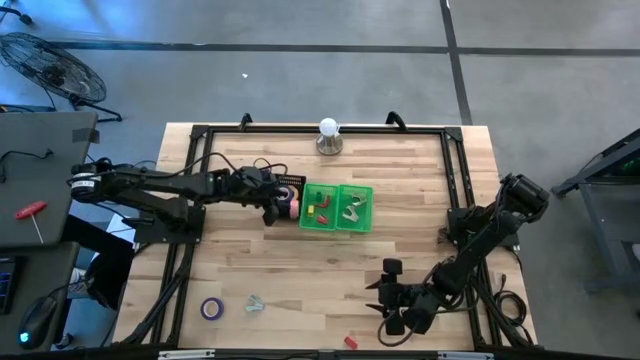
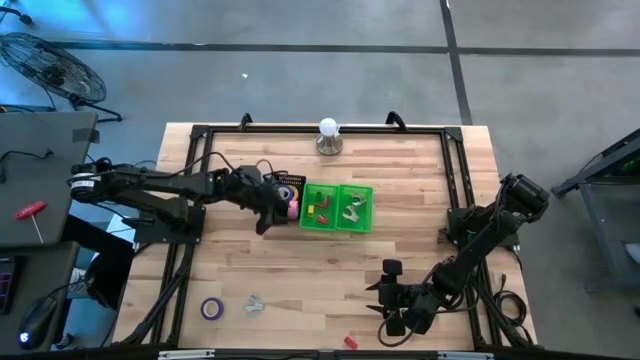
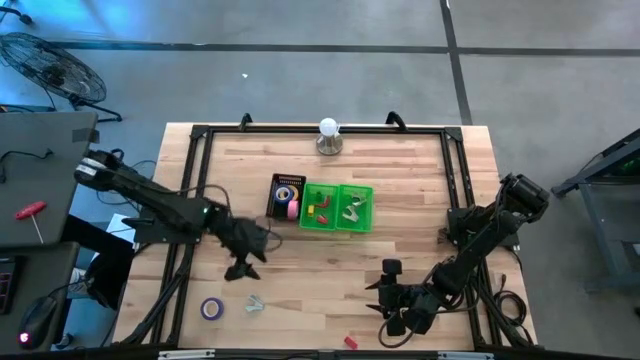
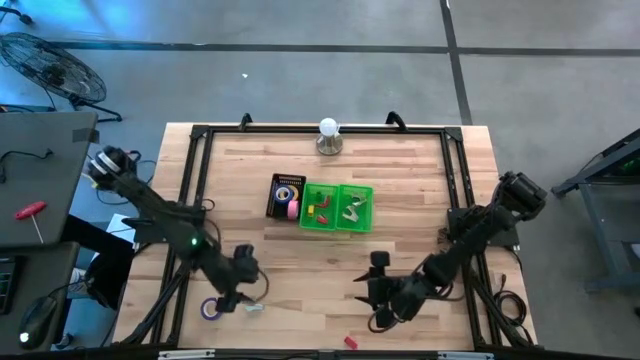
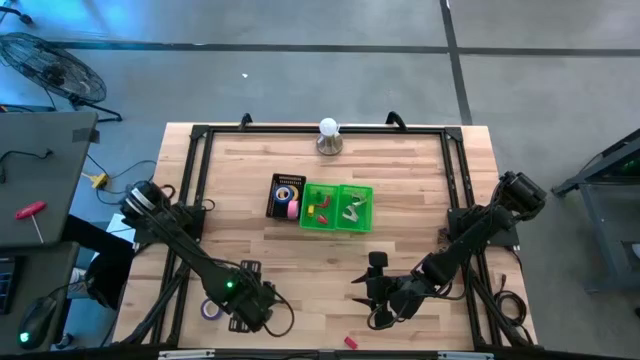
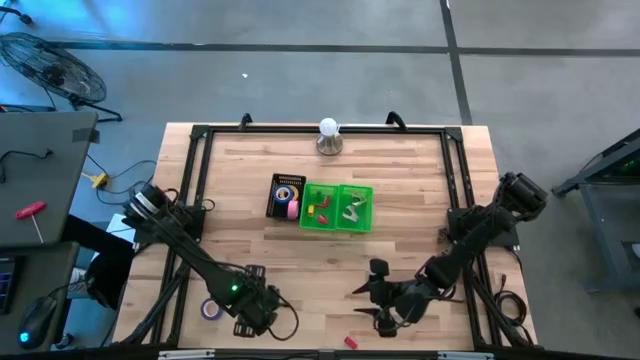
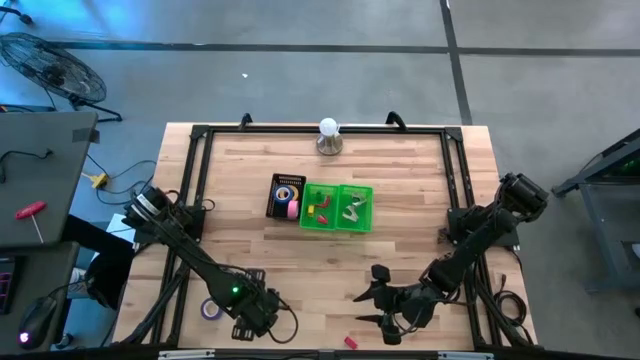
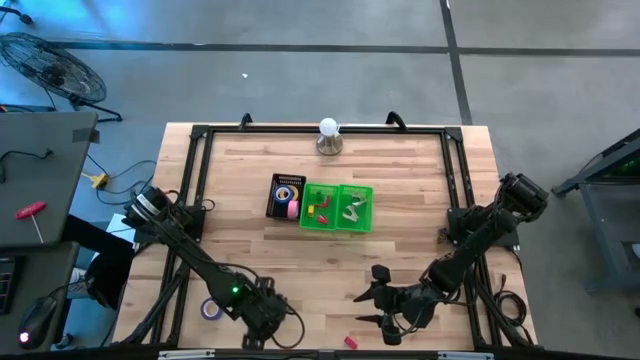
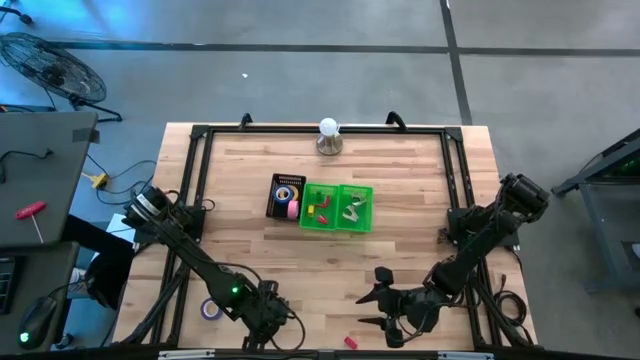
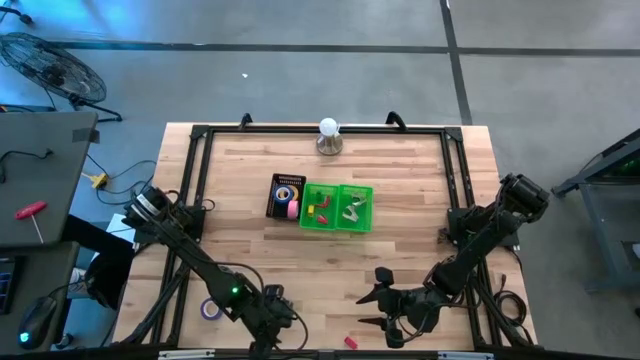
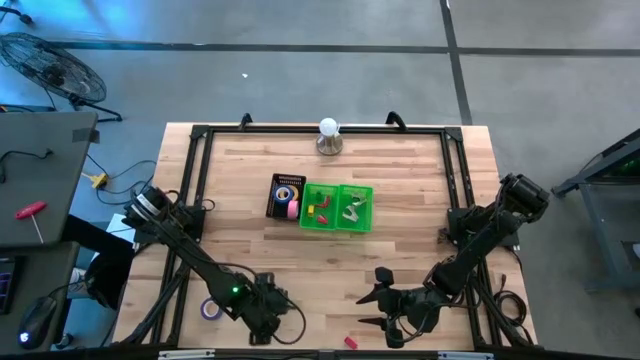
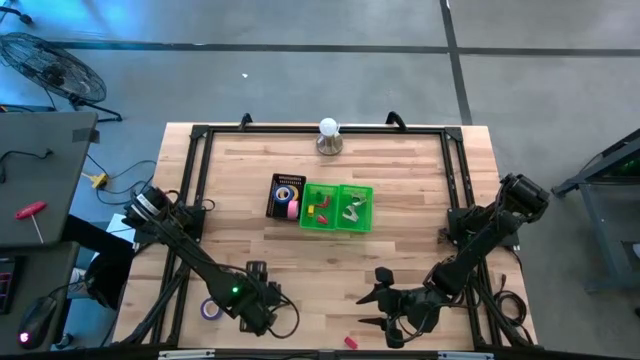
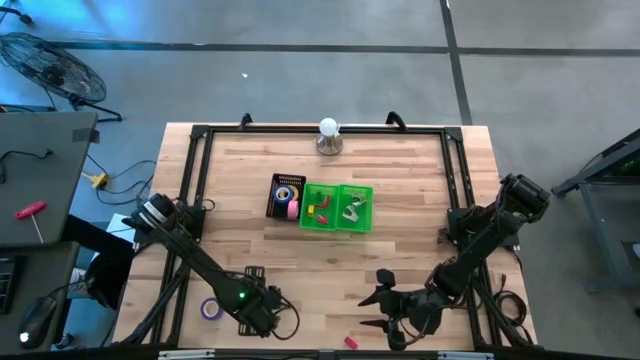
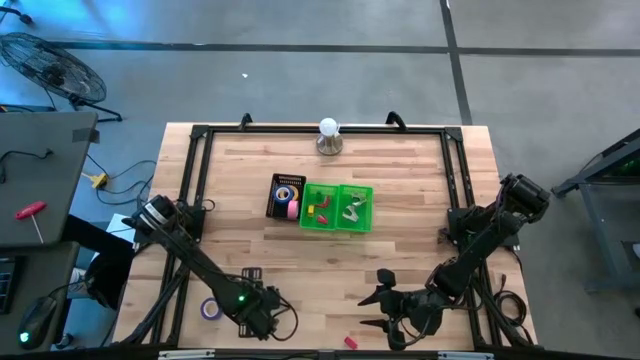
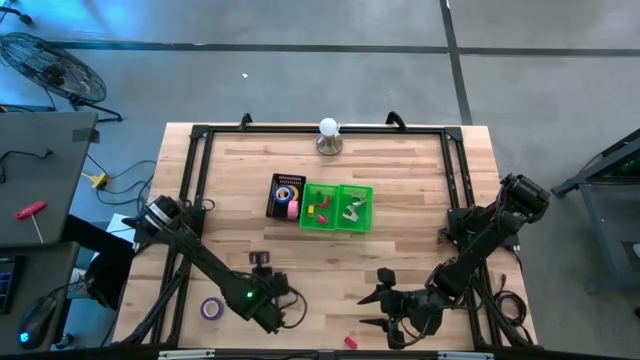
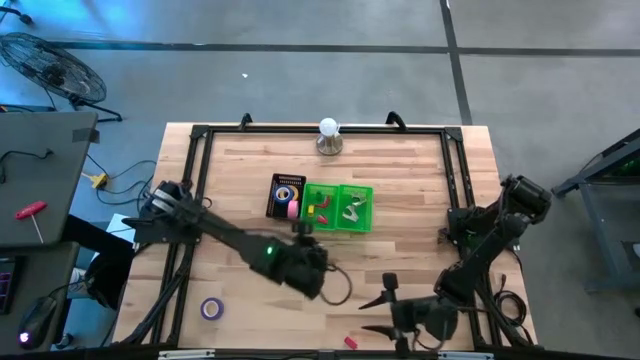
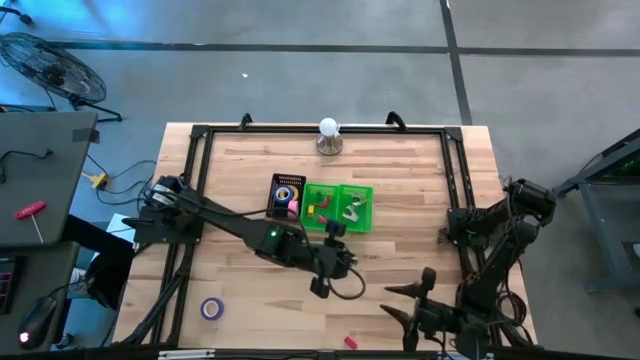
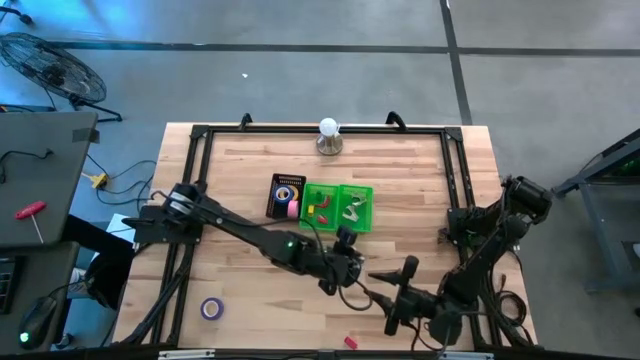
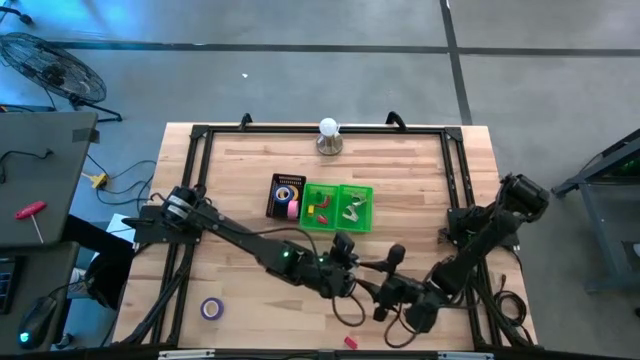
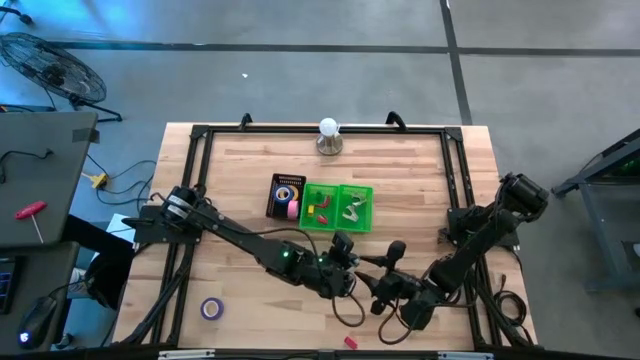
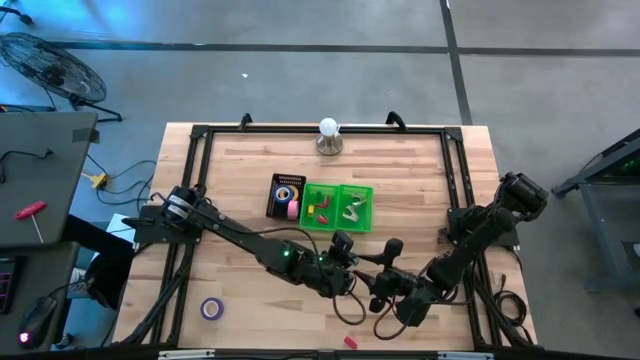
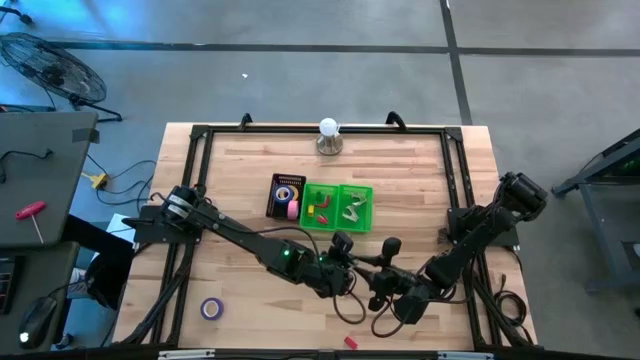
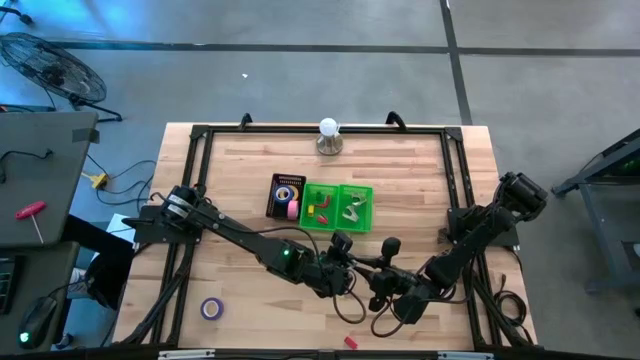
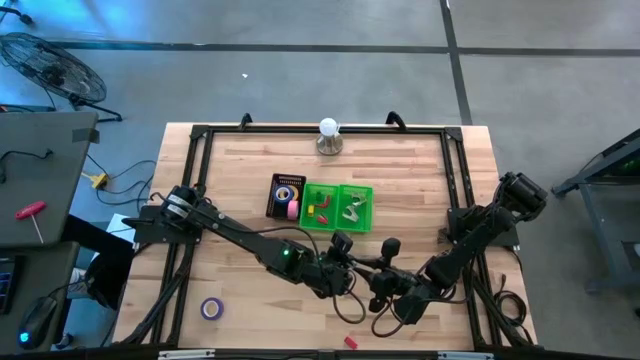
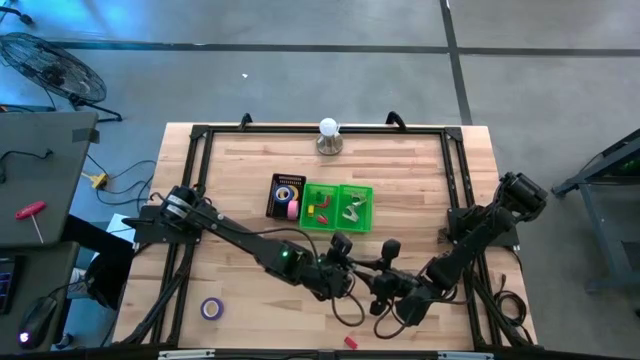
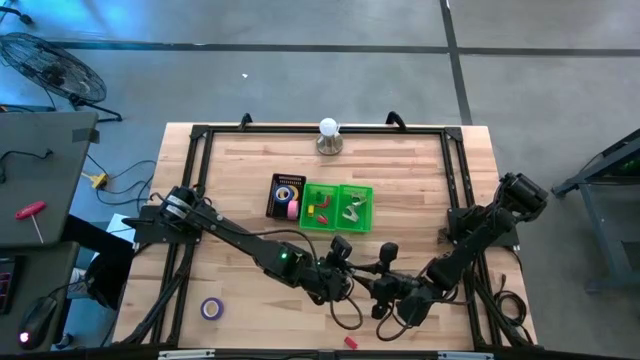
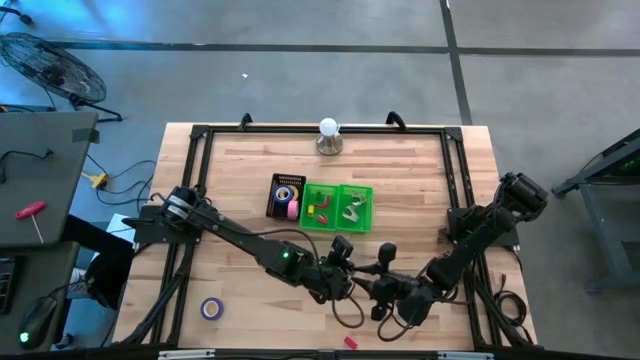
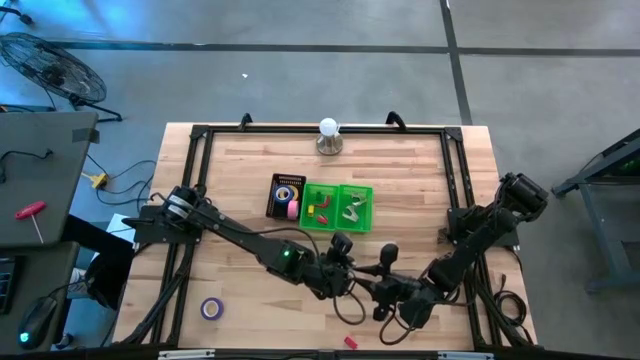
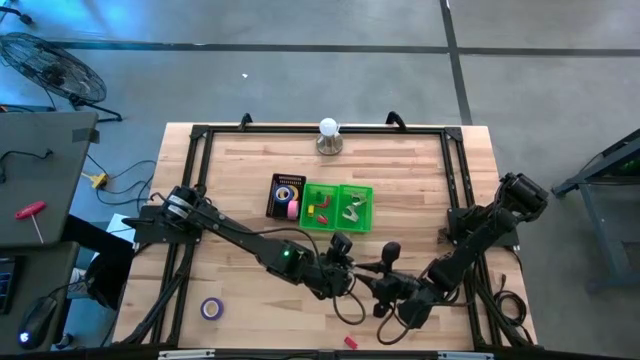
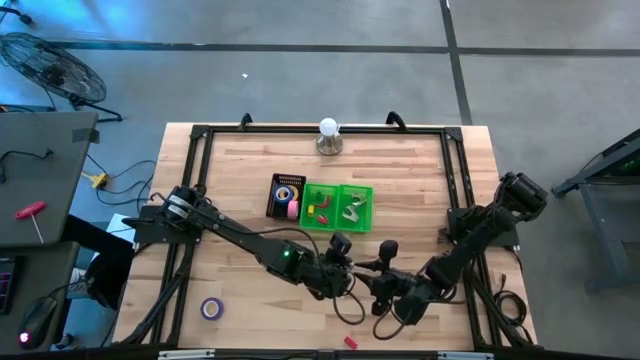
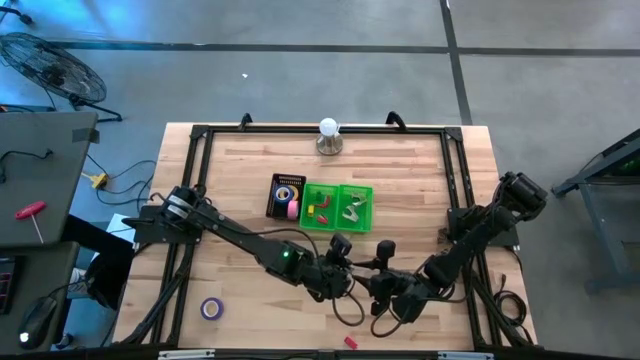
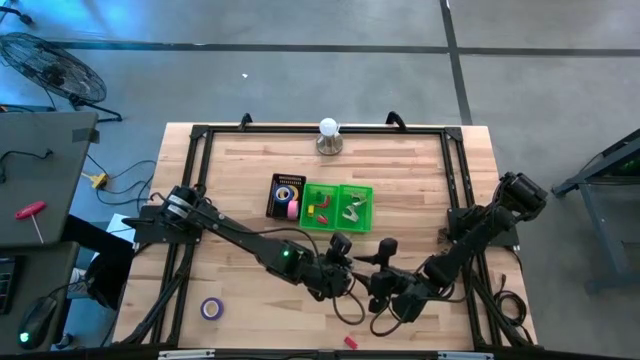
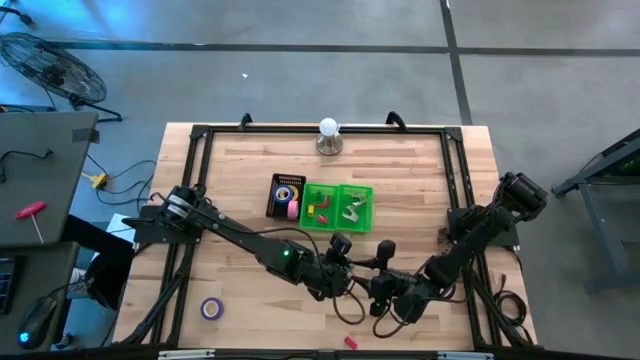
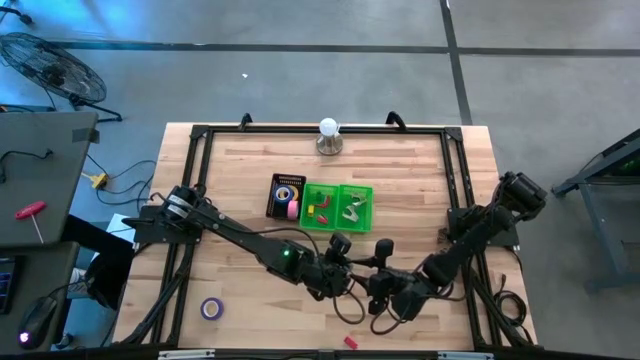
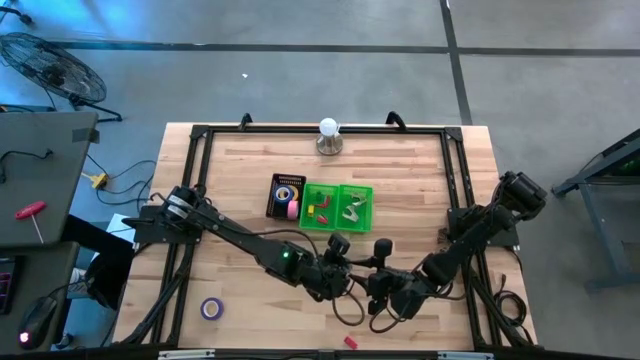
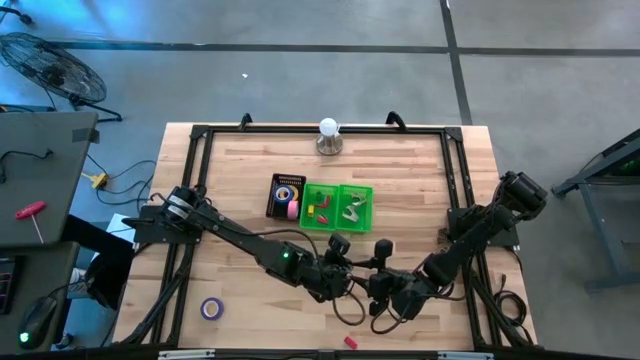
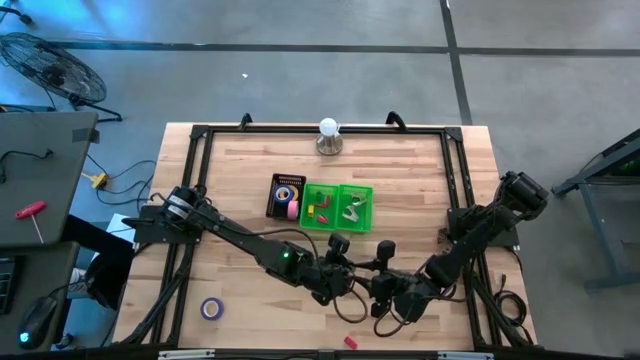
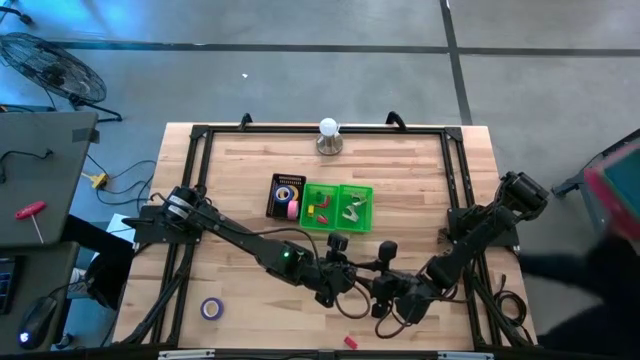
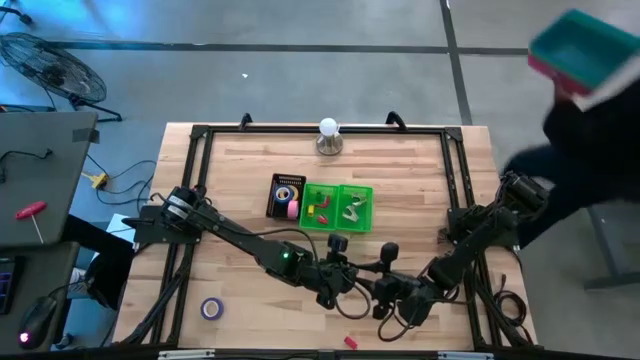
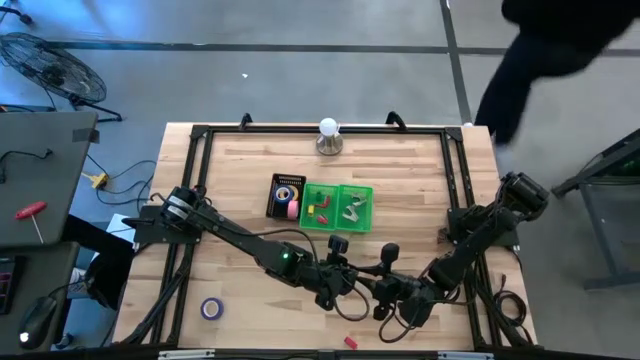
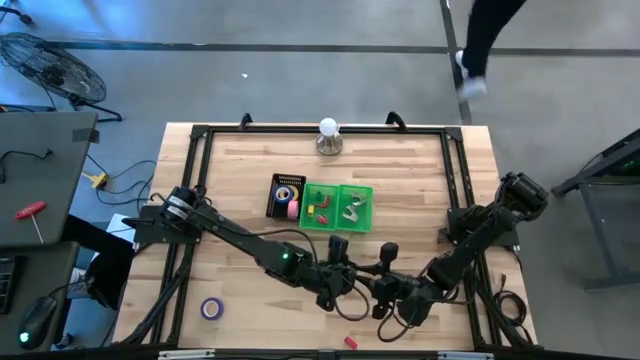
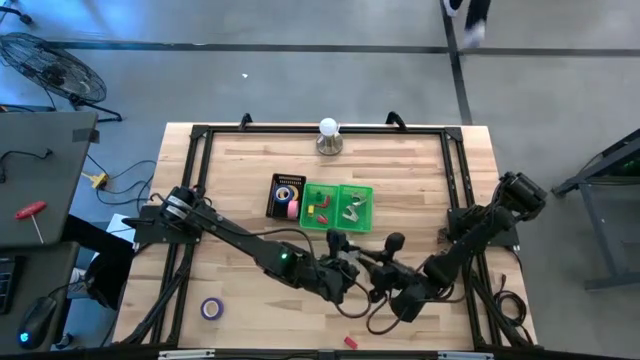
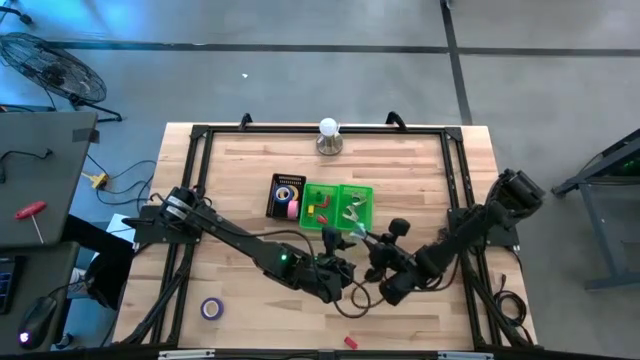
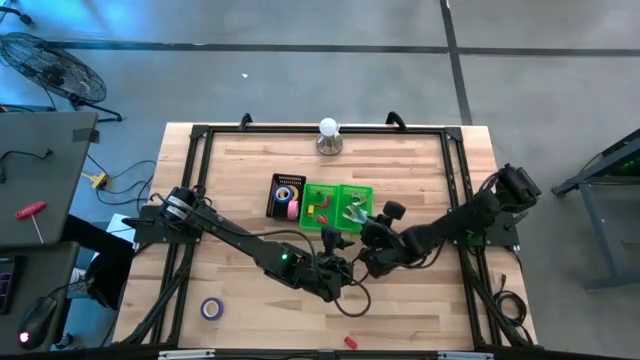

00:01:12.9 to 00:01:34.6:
Task: Pick and place Stapler, Stapler remover, tape
Put the blue staple remover into the right green bin
